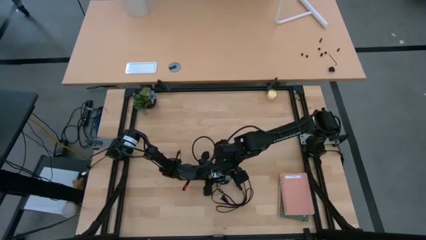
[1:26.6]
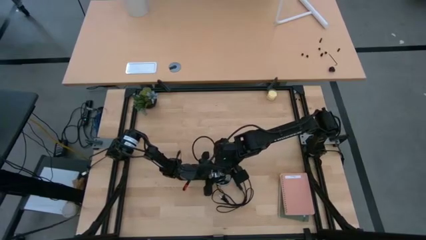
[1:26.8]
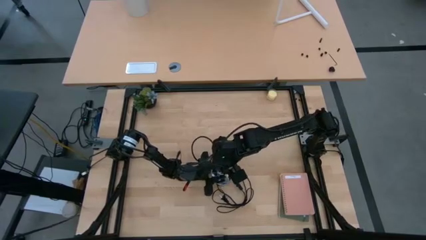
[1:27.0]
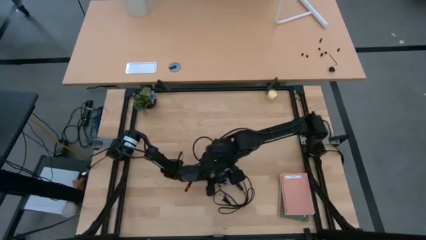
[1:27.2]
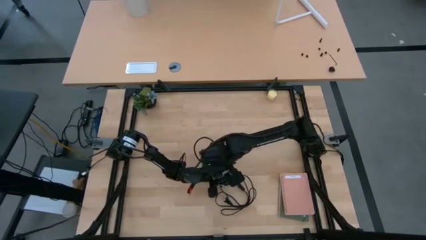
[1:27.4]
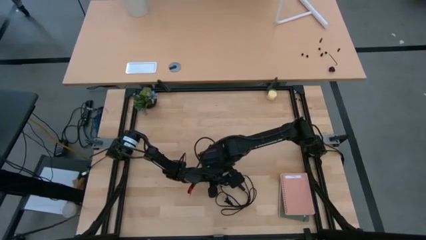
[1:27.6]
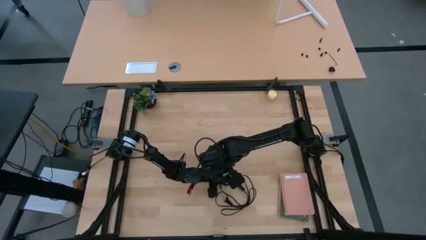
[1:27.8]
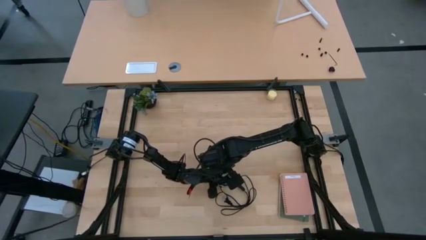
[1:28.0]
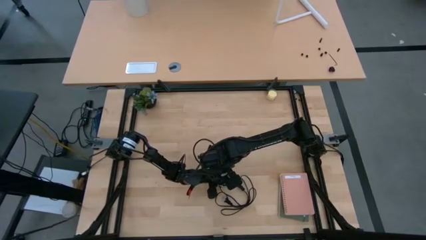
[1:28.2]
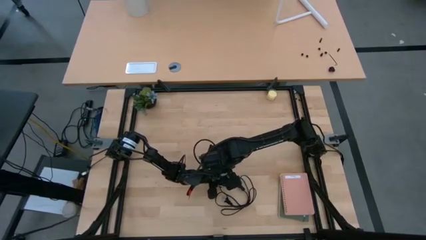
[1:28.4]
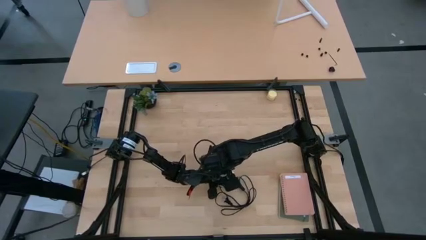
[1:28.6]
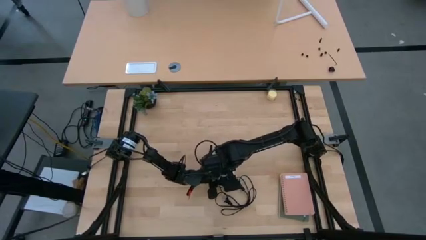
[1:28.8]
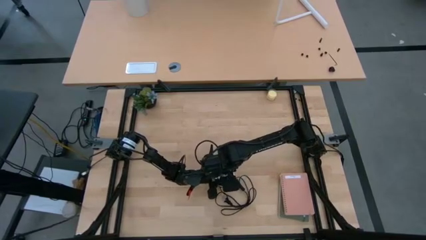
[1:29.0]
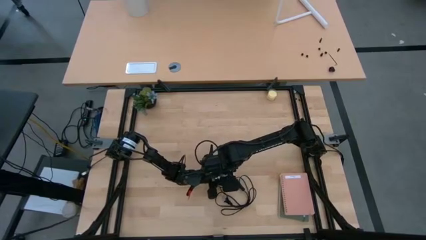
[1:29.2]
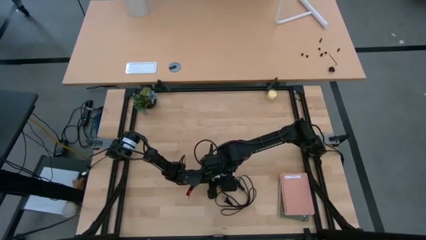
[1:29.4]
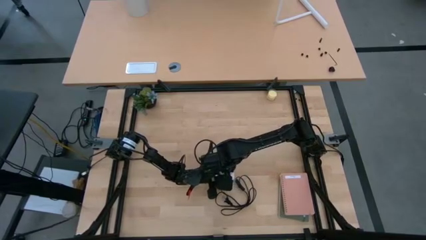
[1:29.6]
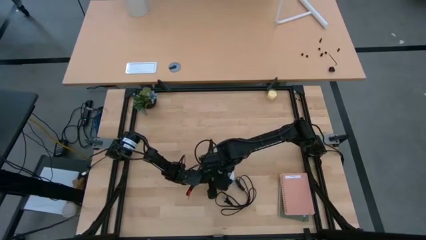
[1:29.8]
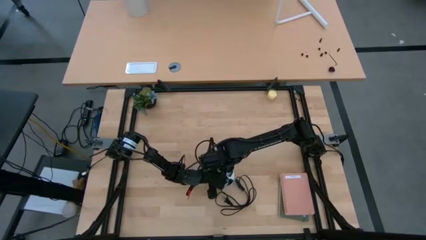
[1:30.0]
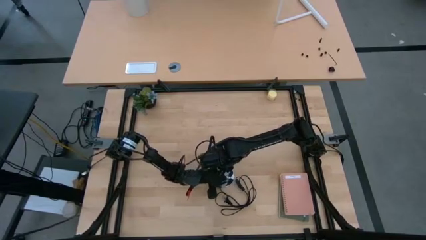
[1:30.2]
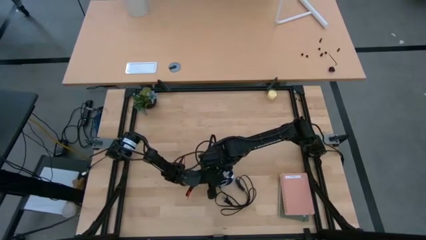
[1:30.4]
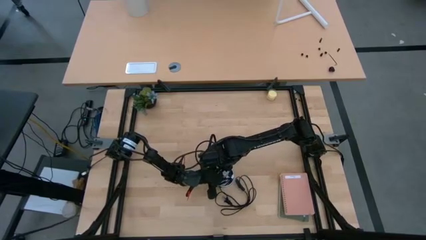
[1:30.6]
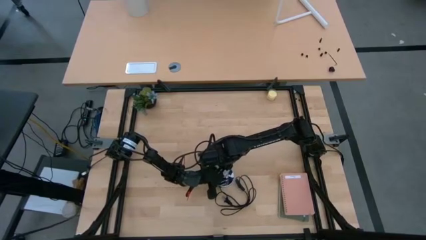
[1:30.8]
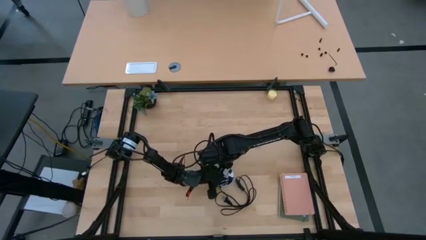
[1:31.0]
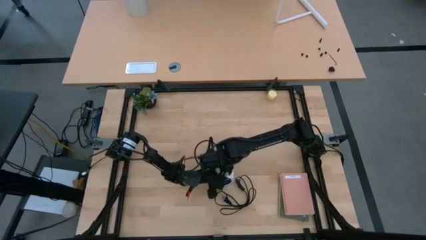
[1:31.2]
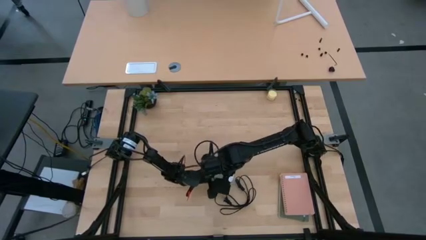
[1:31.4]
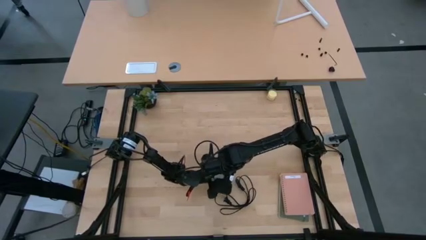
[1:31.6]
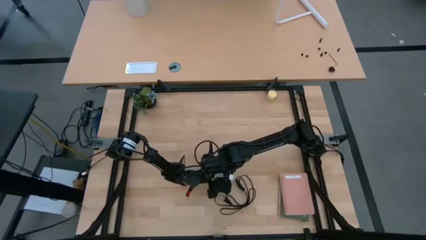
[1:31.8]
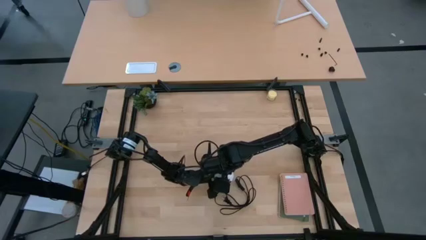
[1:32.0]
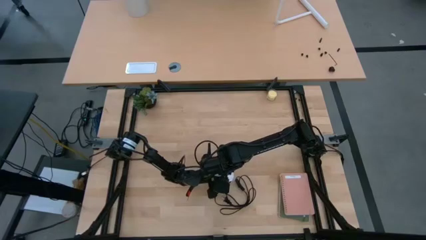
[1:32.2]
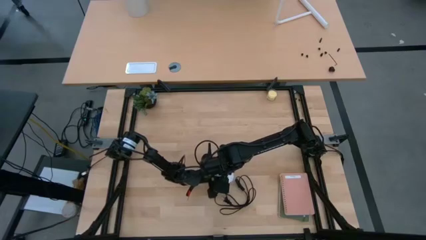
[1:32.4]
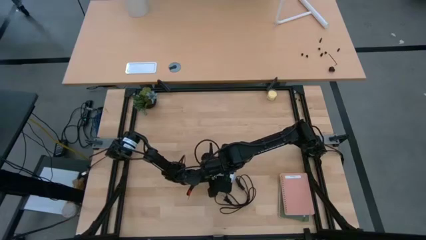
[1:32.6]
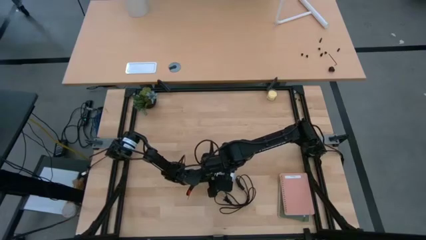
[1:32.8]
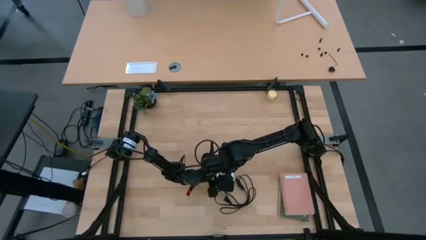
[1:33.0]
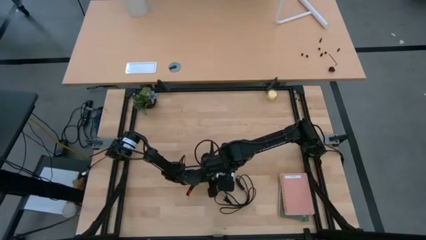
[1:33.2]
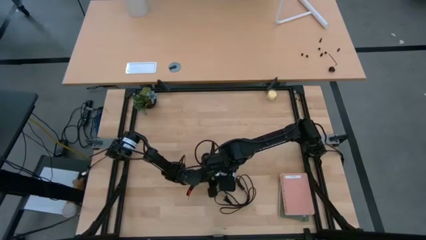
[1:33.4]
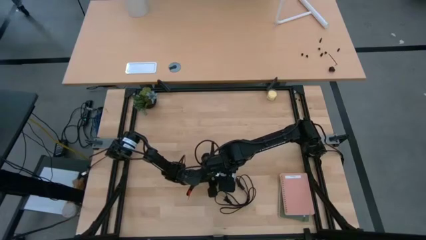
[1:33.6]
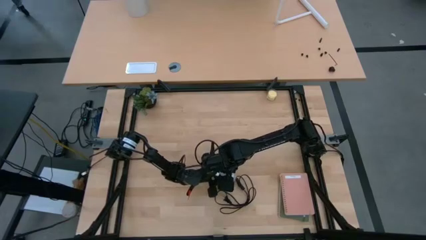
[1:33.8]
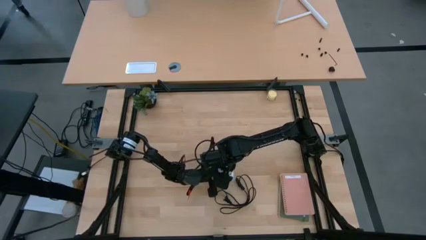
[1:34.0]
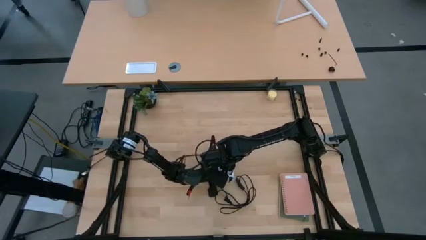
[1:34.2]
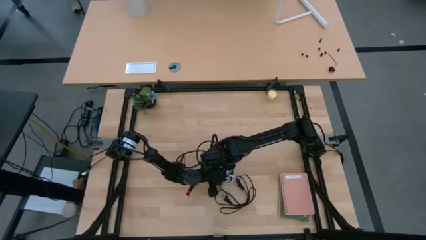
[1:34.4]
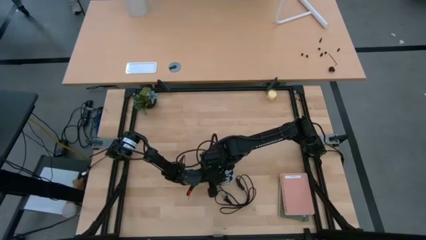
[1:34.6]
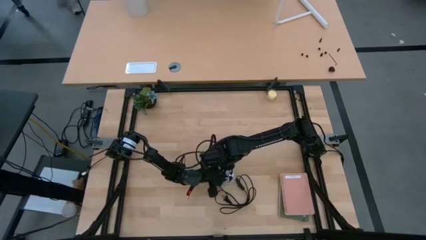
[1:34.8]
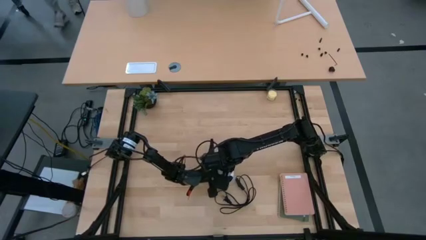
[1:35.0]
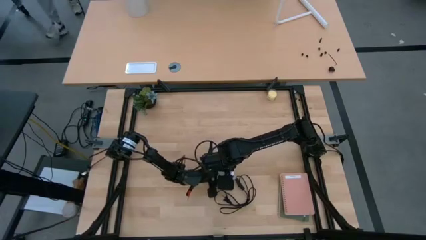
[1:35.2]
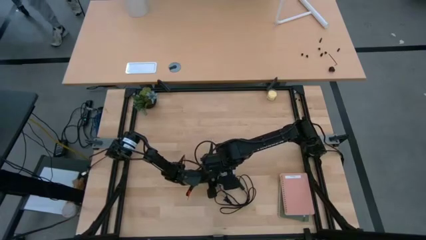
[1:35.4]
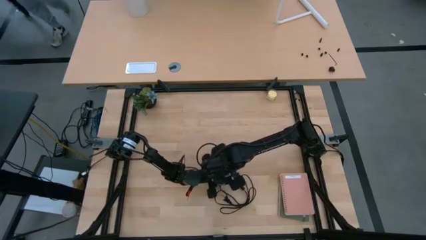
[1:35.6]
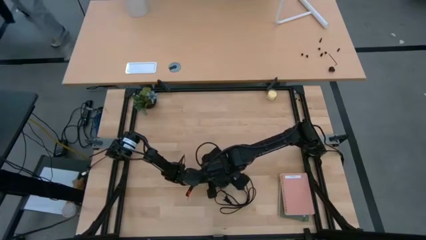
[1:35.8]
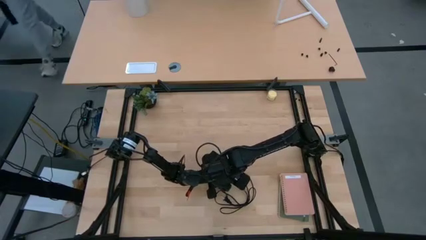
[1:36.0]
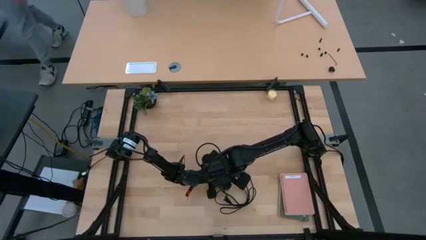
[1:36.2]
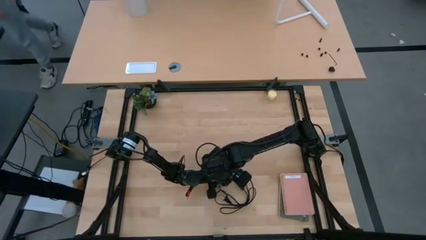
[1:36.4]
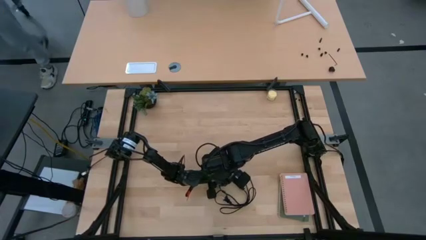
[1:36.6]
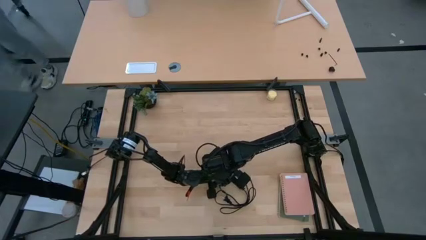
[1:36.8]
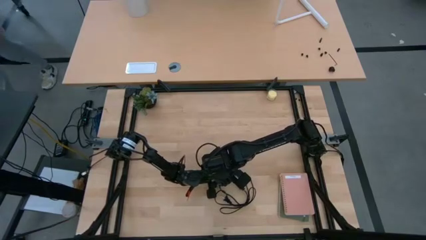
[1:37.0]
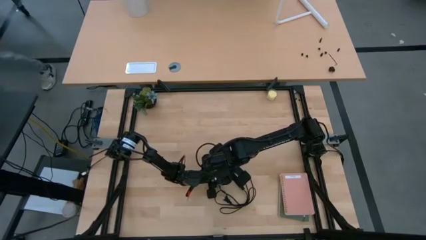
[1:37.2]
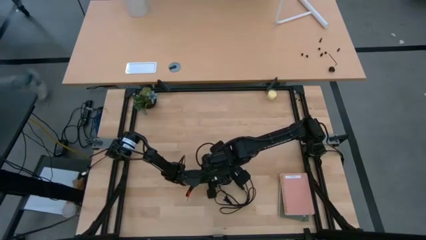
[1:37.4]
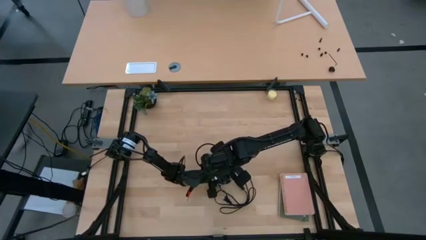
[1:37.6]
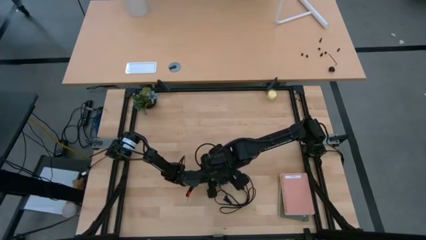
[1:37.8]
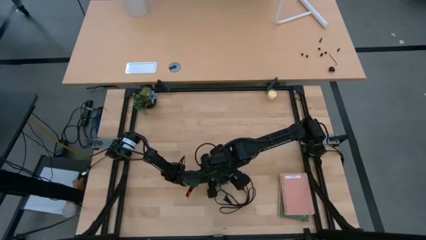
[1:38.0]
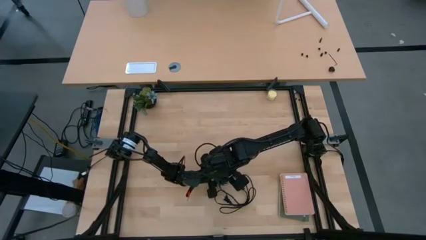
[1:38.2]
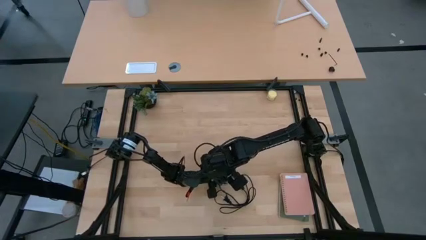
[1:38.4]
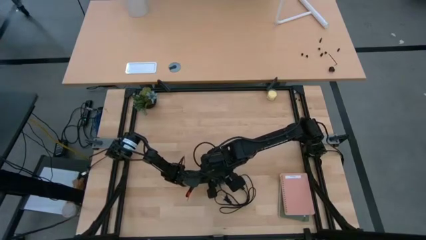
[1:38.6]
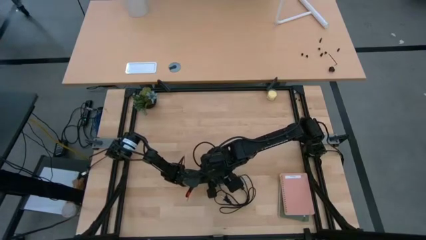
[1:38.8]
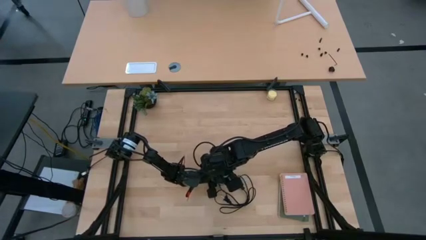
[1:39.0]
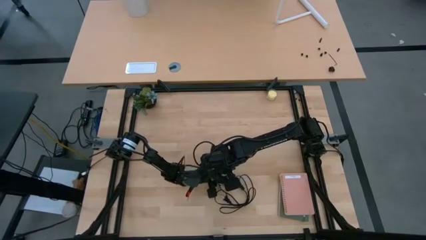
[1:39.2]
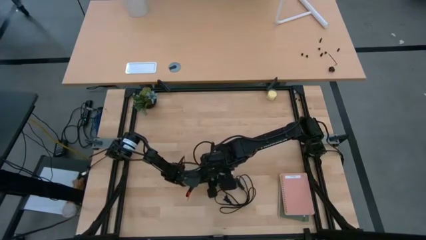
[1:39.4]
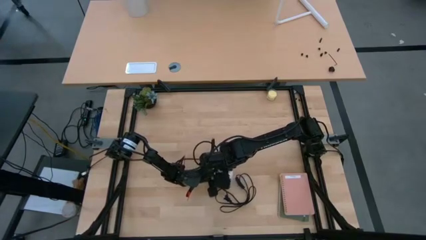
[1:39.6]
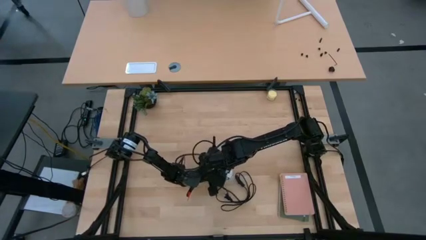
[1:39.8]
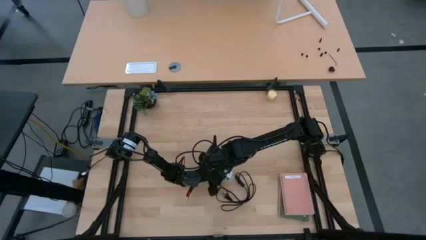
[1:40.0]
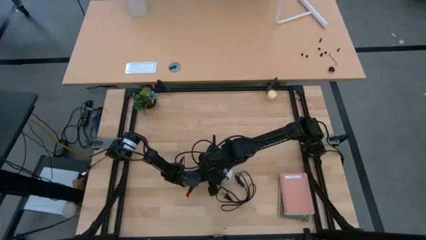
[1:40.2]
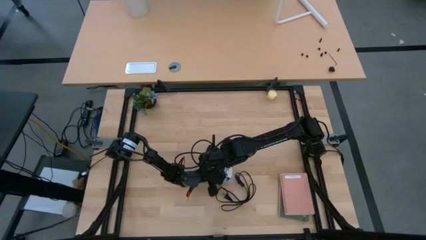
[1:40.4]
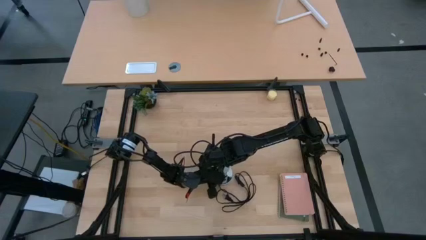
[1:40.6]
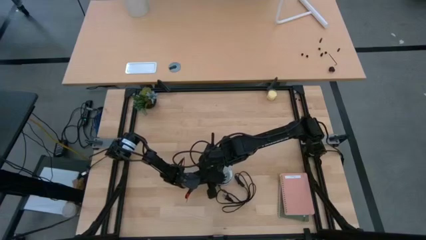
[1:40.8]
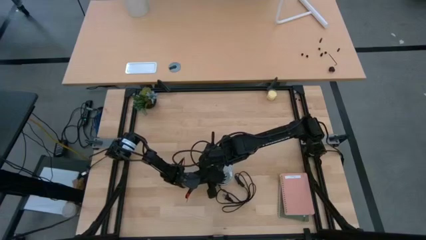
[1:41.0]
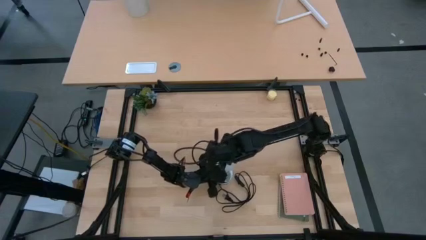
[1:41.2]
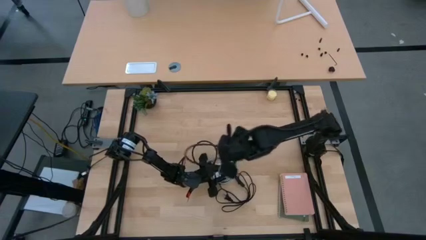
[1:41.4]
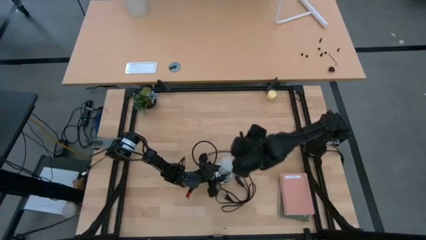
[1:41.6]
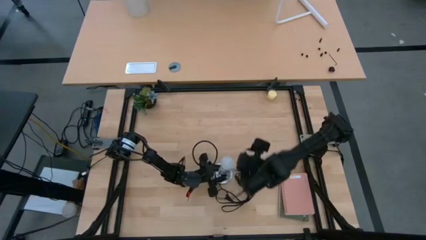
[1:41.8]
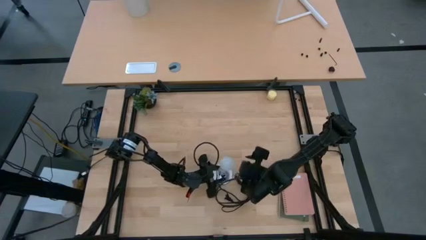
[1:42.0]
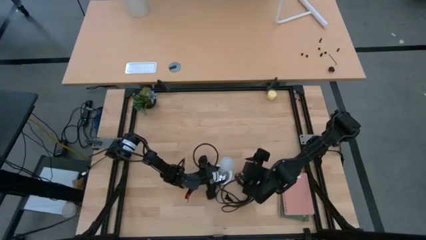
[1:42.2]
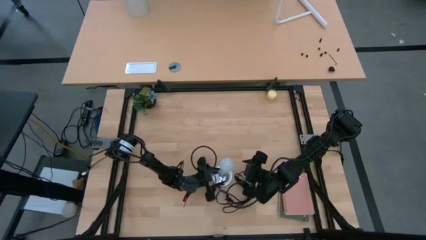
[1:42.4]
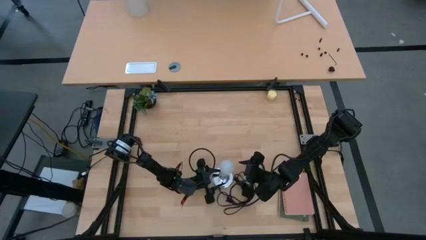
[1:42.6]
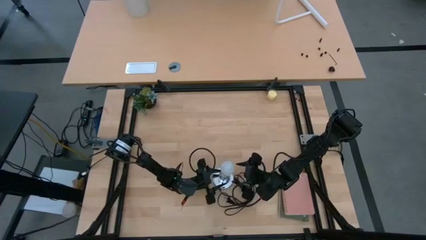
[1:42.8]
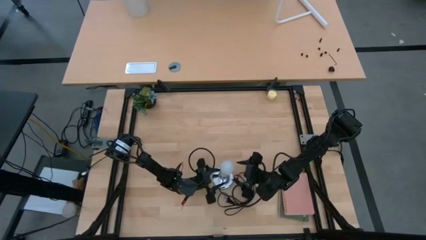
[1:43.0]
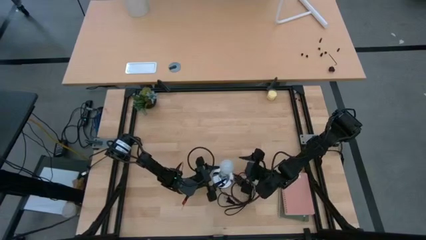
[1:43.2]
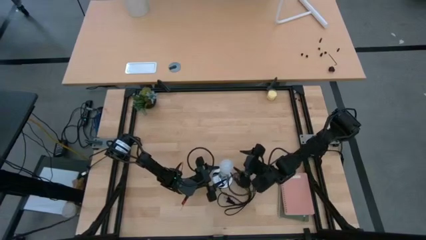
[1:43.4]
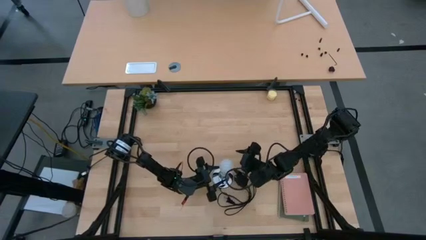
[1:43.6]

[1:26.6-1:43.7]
Task: Screw lightbulb
Insert the lightbulb into the lamp
